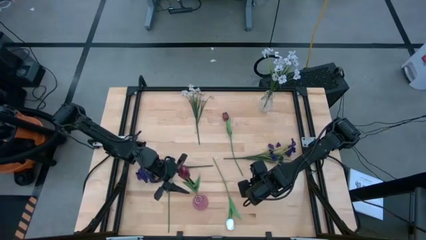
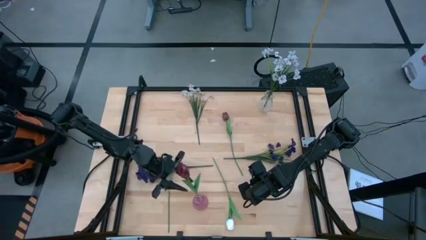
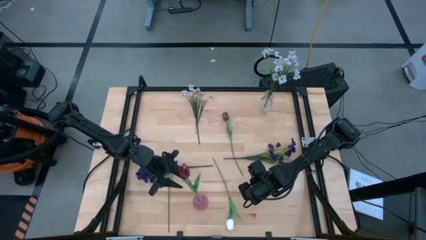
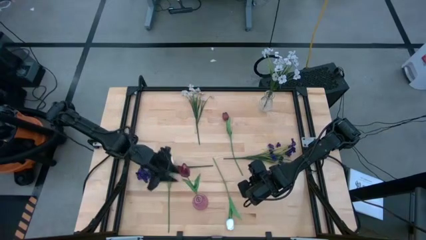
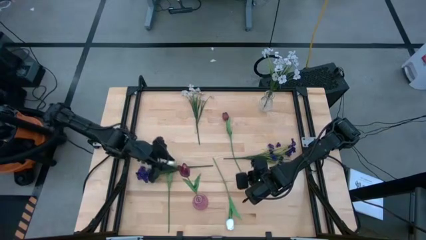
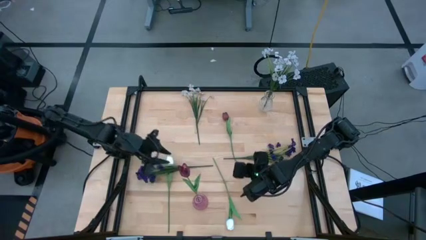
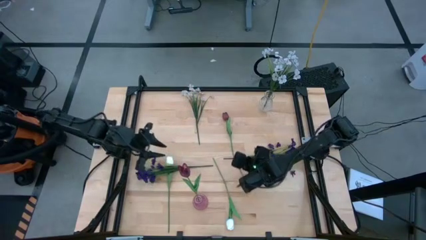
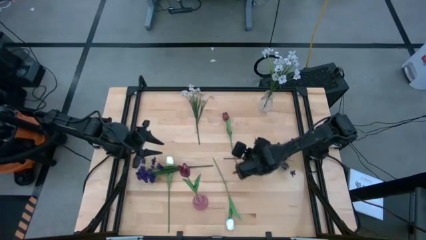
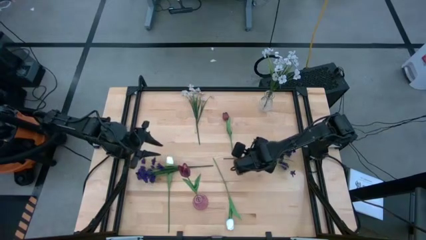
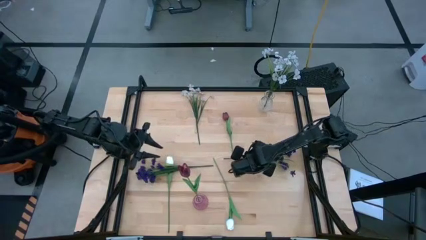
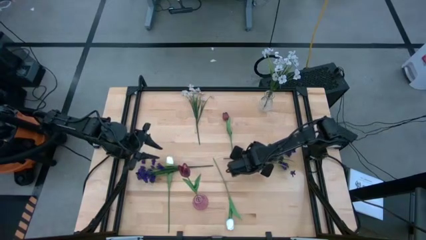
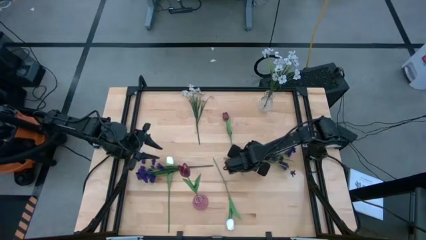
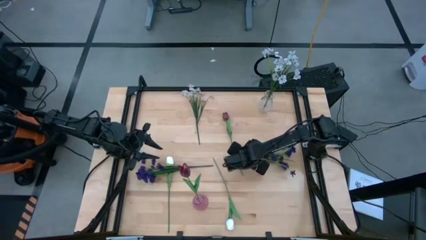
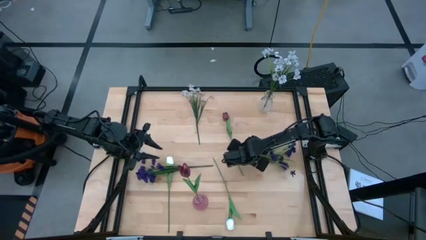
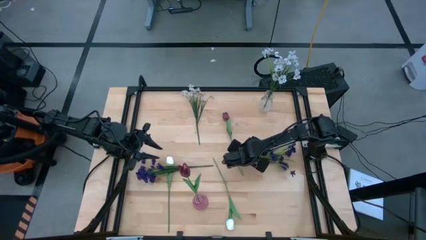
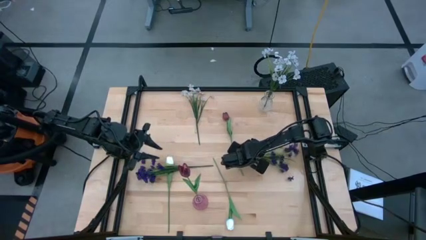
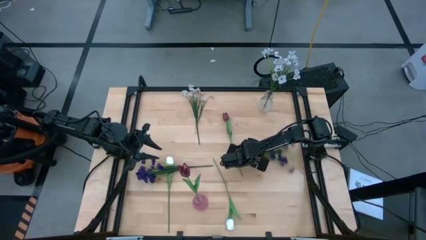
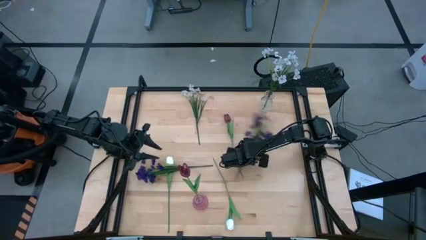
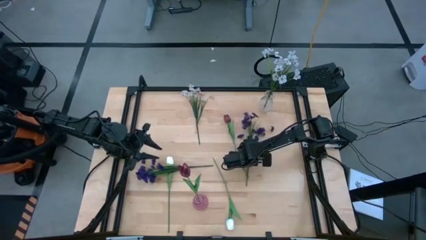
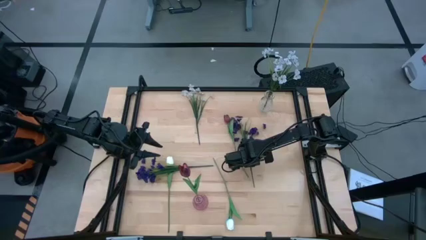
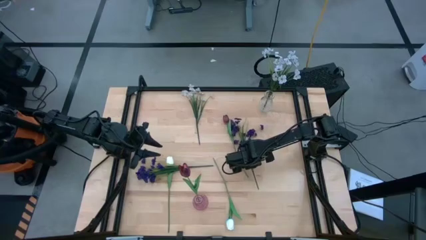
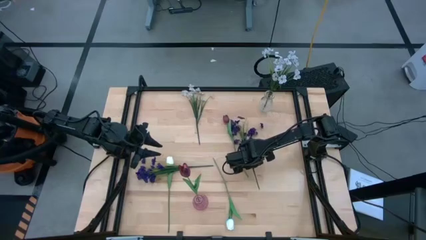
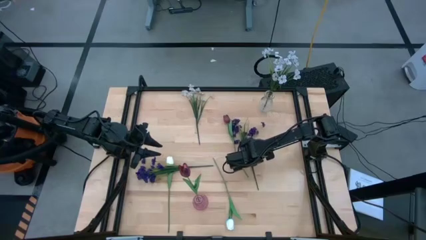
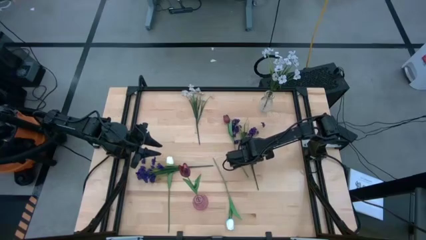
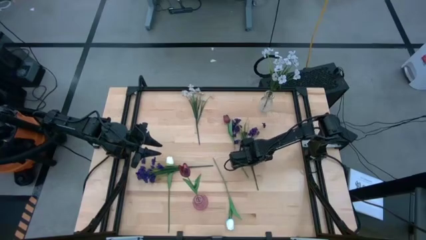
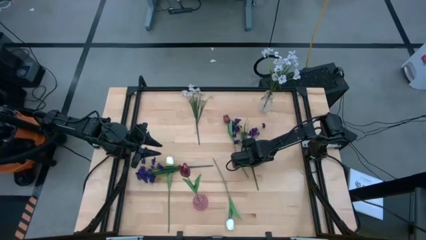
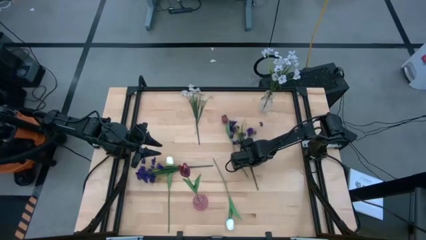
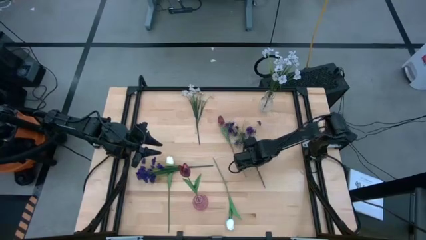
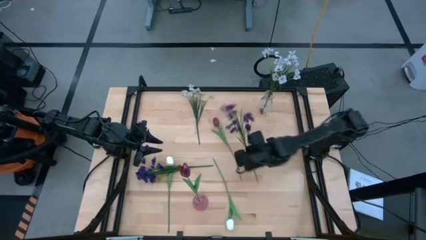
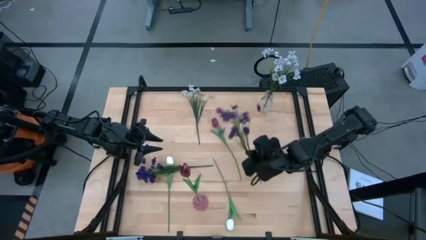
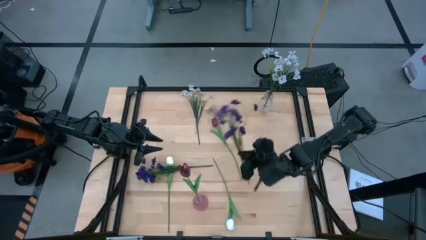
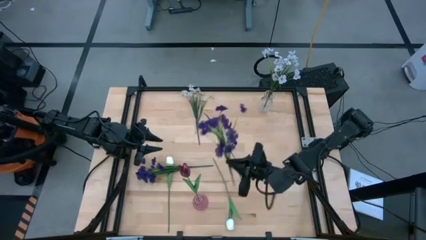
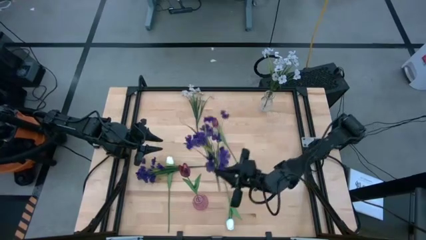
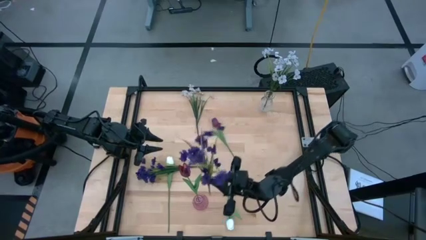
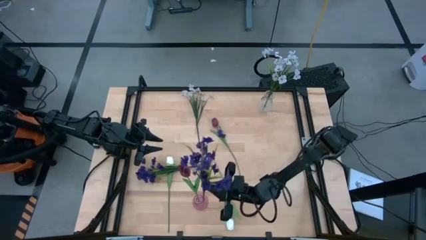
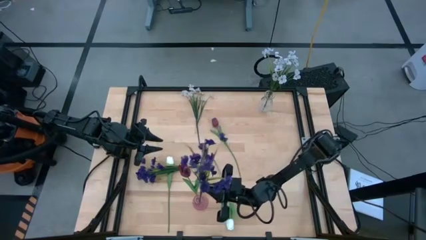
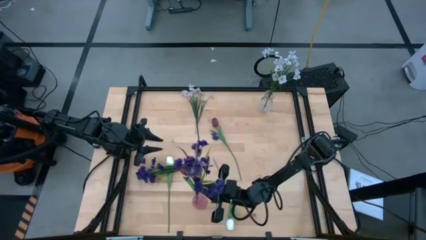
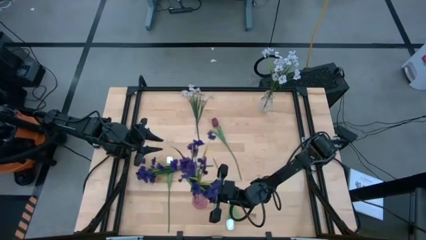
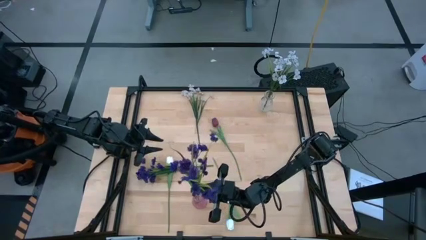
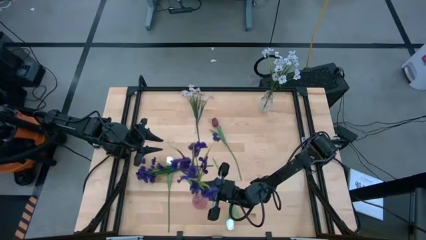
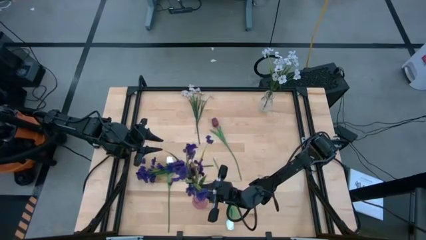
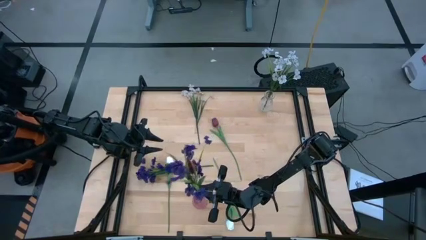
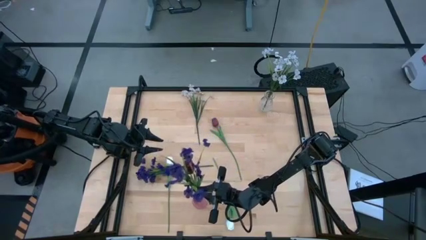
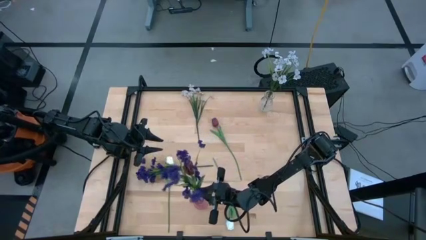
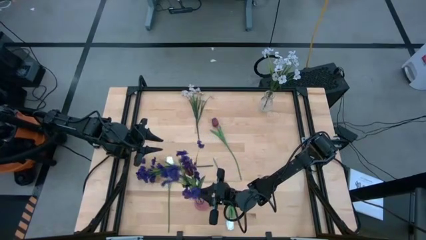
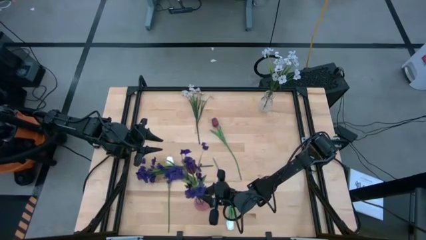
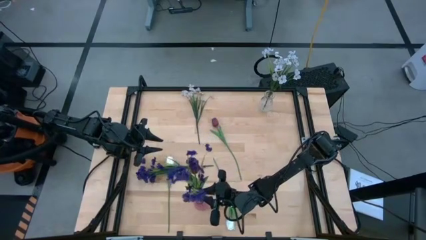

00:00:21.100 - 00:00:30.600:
Task: Sort flowers into vase by color
Put the violet flower into the pink vase

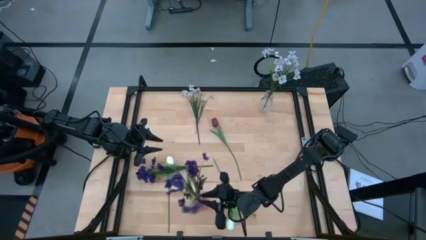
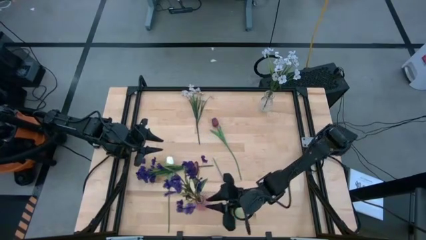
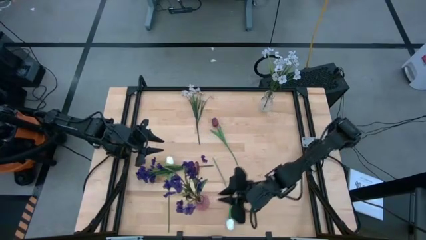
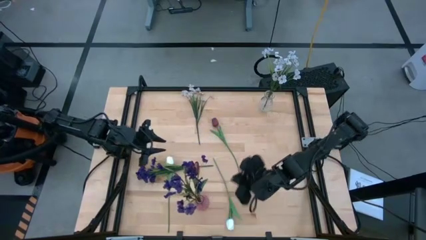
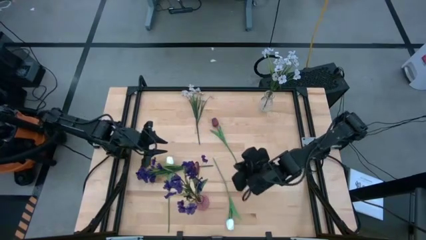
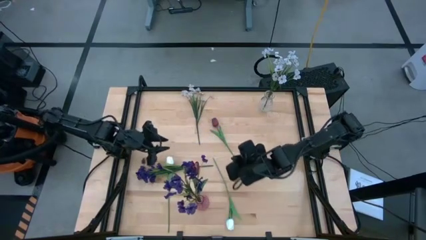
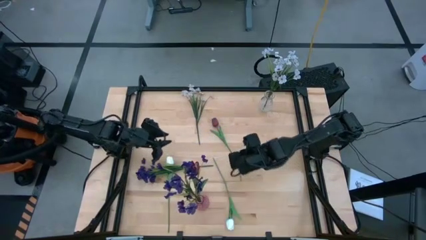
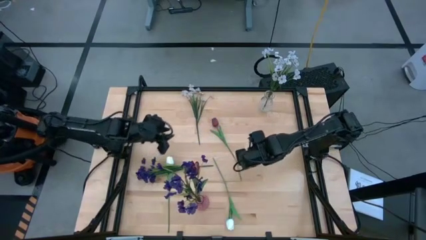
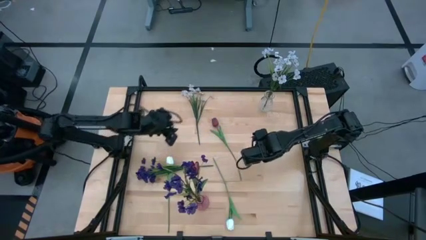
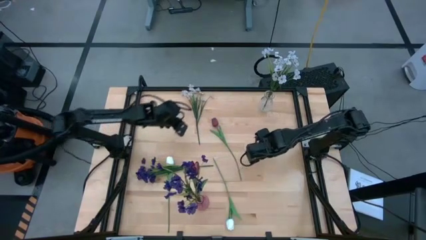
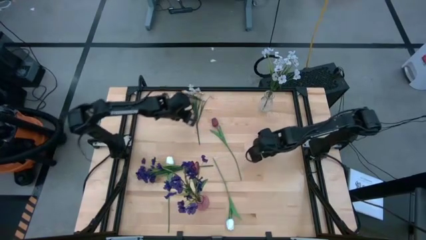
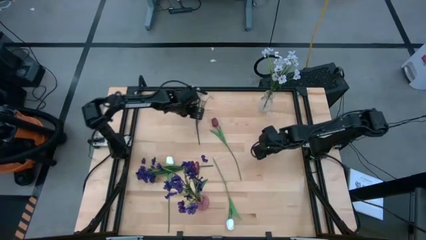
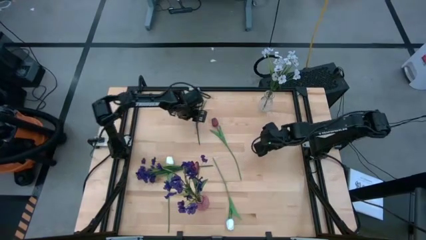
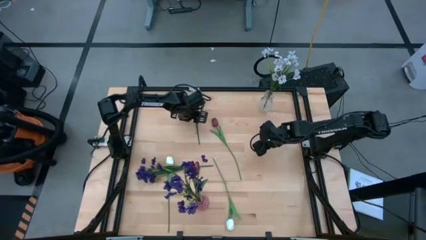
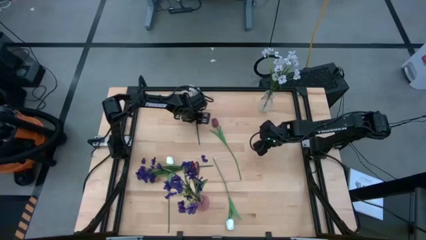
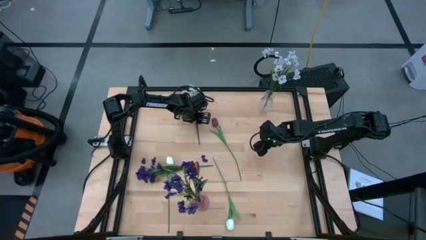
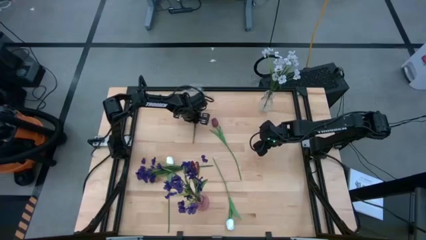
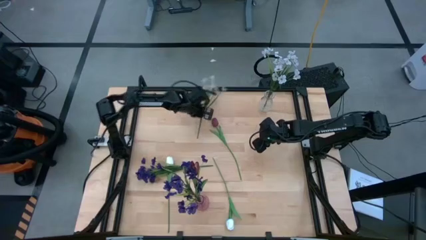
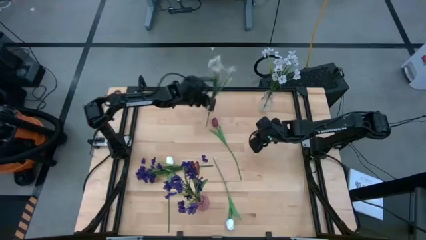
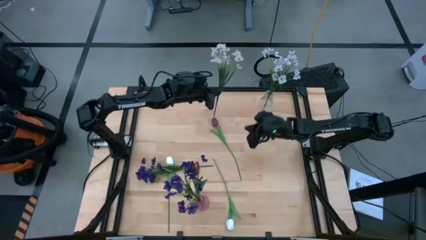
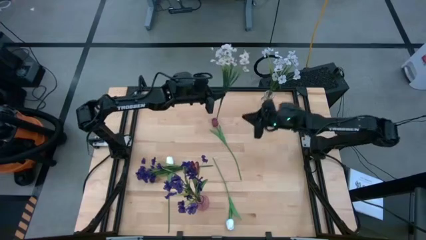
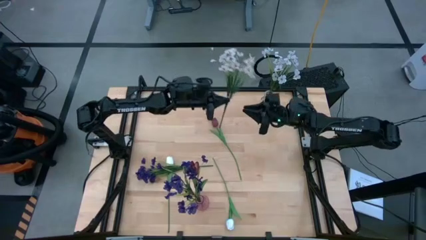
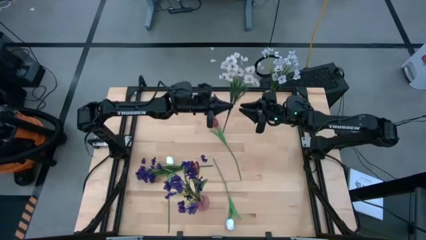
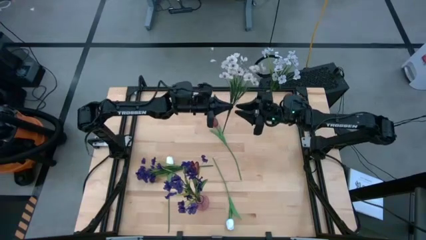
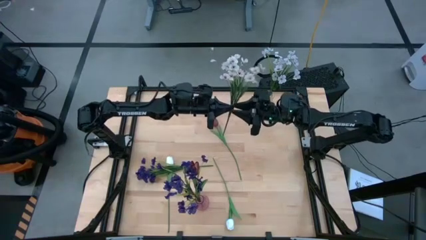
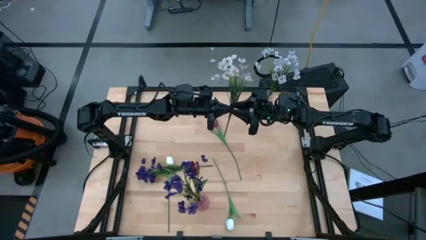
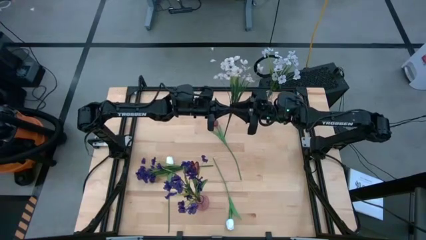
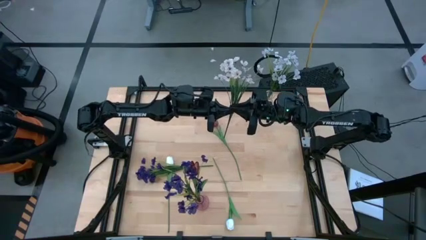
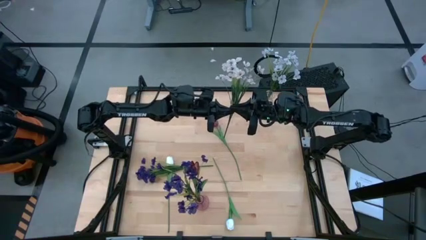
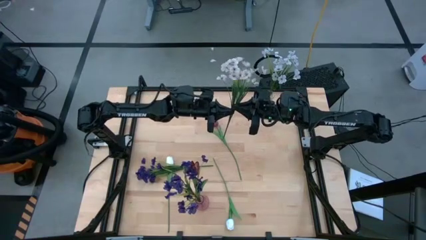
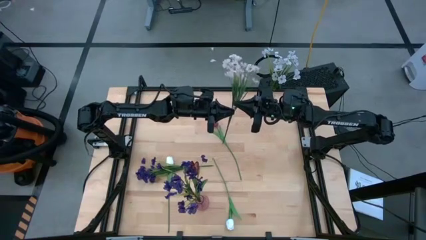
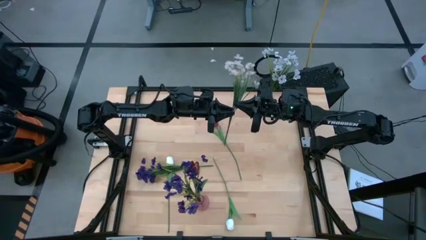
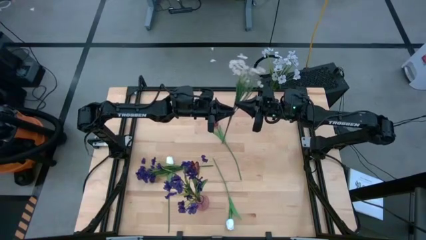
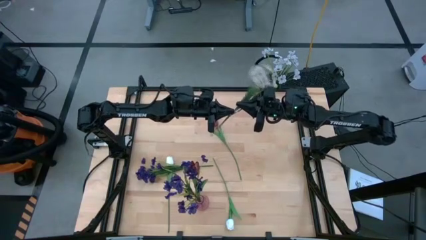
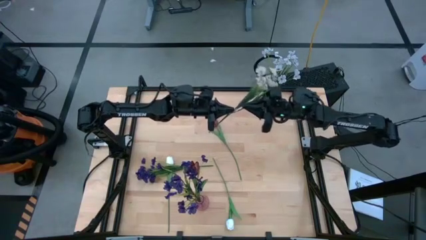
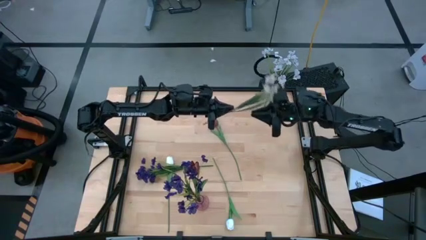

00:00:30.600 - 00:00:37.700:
Put the white flower into the transparent vase
